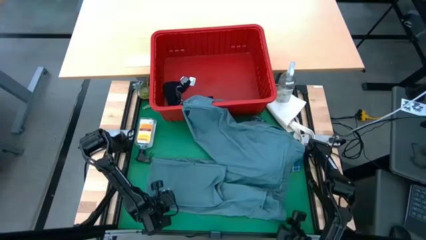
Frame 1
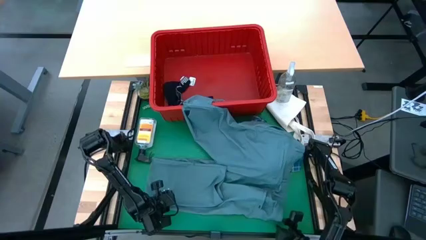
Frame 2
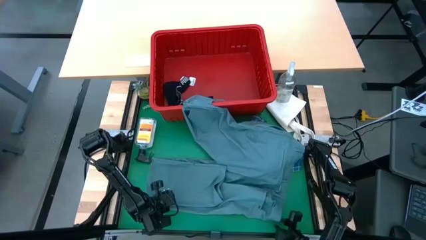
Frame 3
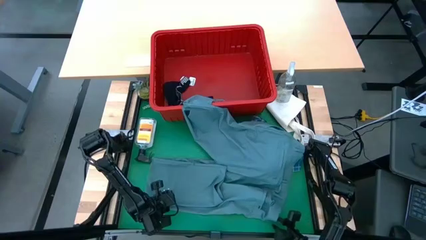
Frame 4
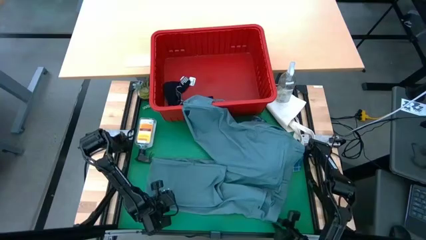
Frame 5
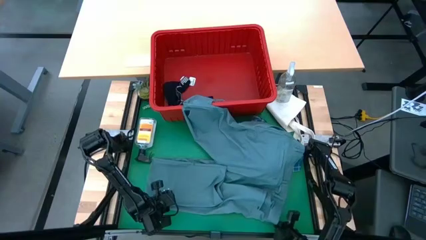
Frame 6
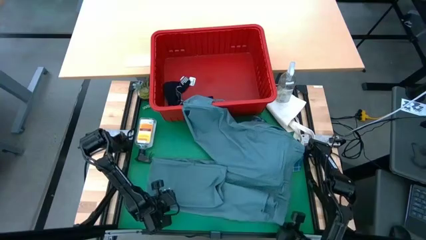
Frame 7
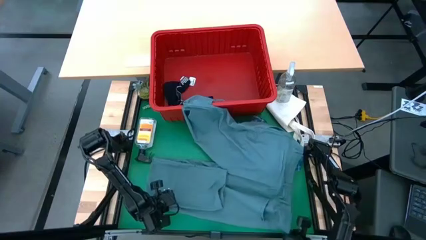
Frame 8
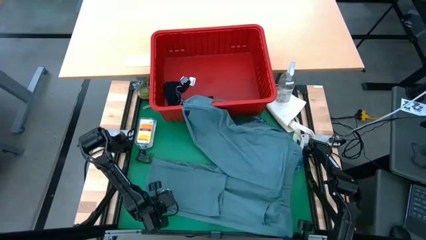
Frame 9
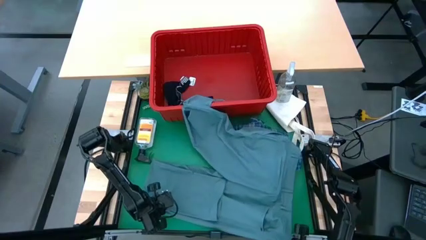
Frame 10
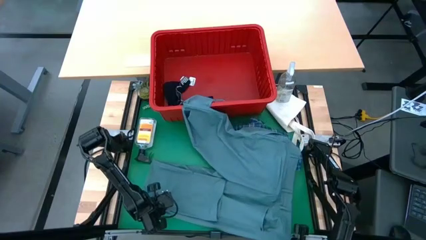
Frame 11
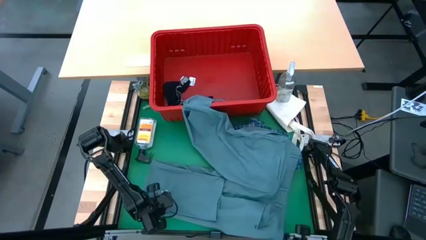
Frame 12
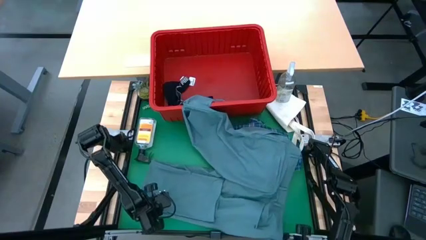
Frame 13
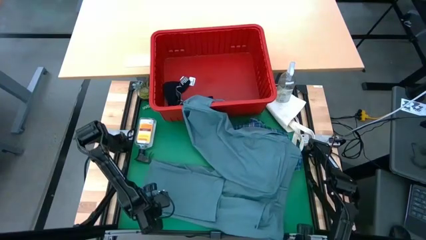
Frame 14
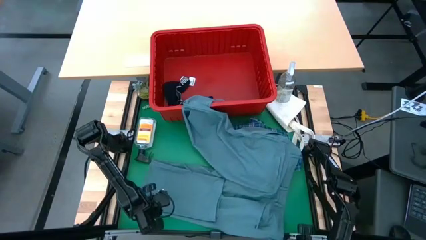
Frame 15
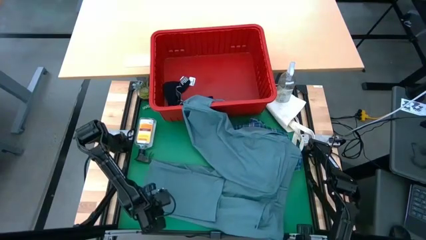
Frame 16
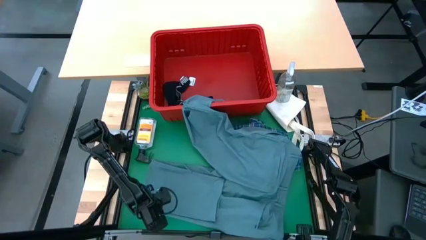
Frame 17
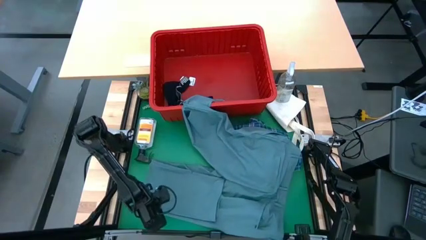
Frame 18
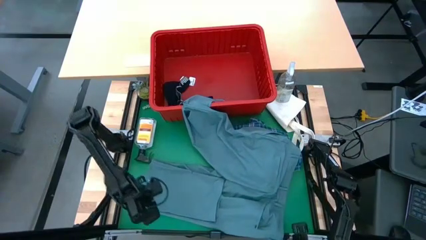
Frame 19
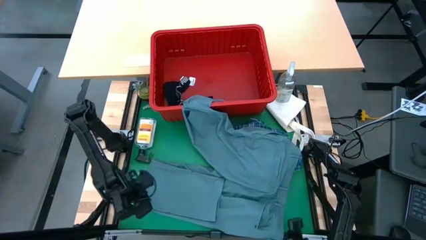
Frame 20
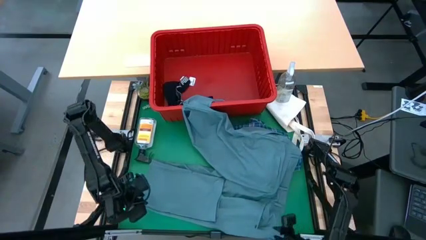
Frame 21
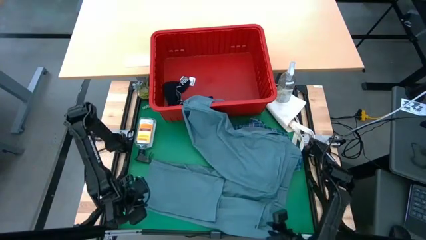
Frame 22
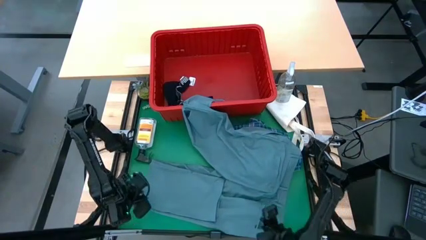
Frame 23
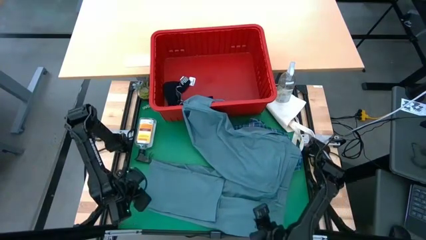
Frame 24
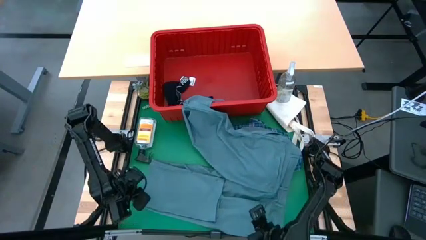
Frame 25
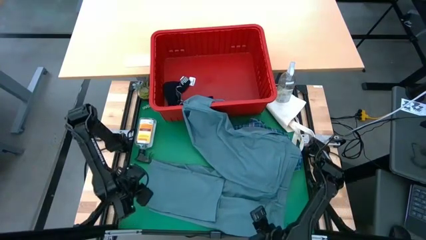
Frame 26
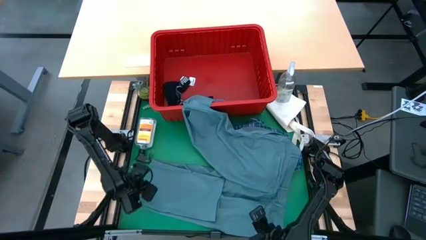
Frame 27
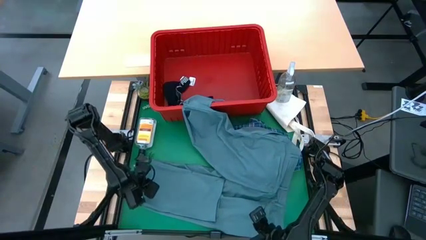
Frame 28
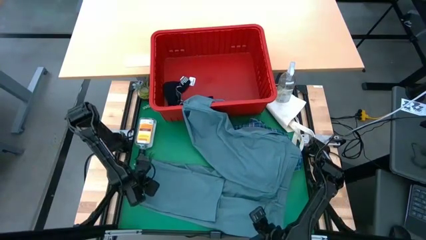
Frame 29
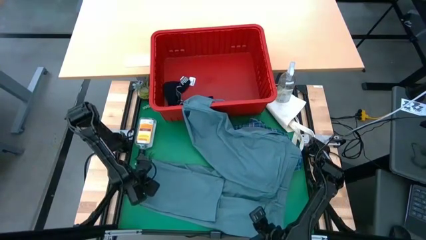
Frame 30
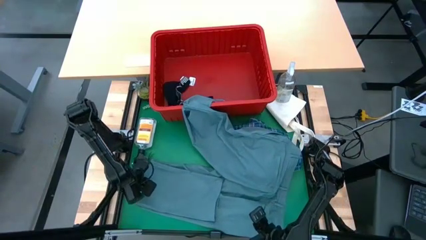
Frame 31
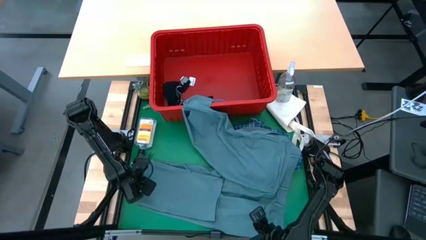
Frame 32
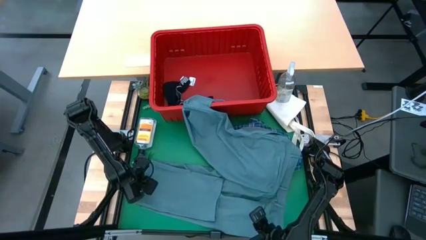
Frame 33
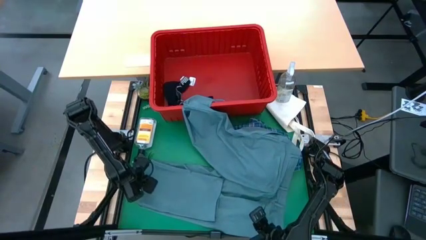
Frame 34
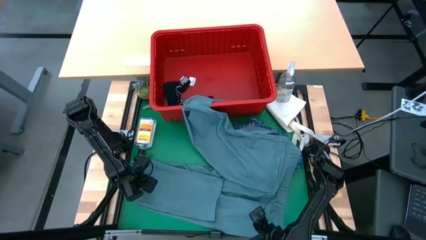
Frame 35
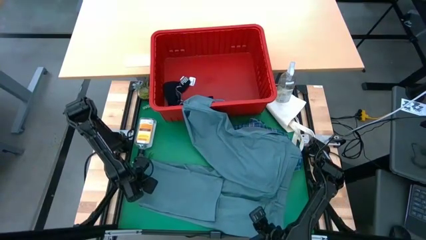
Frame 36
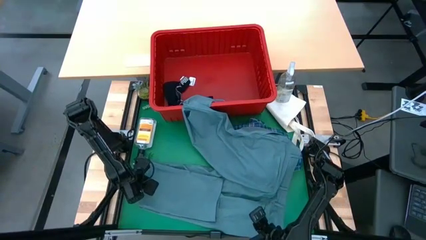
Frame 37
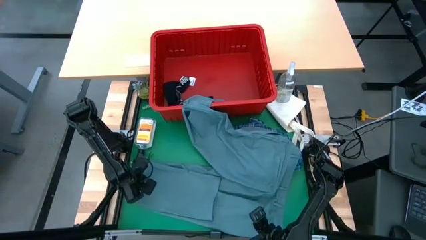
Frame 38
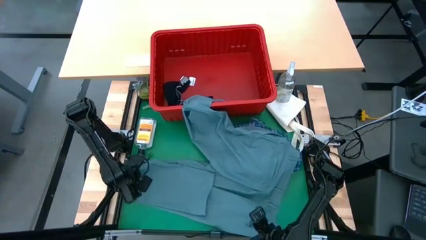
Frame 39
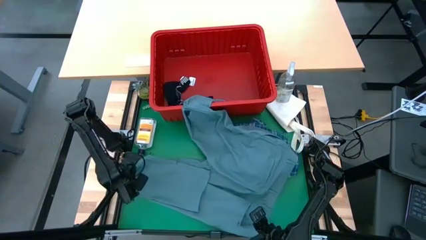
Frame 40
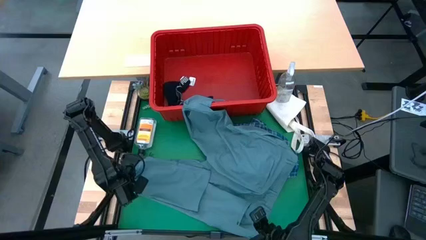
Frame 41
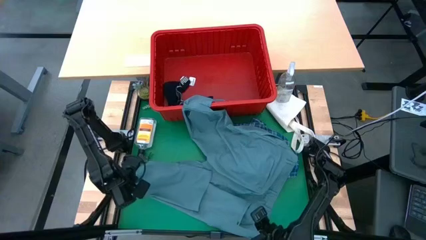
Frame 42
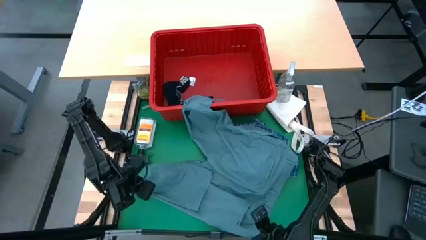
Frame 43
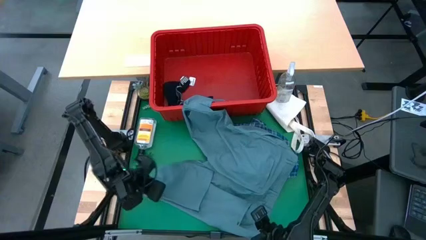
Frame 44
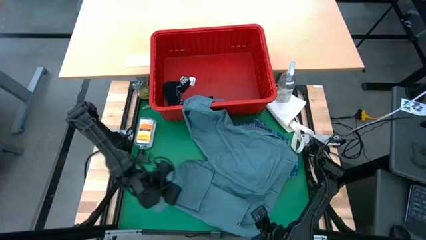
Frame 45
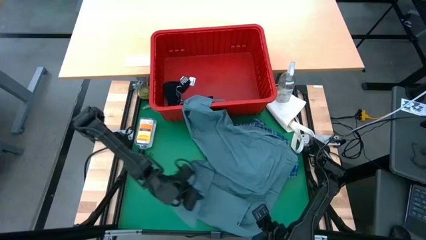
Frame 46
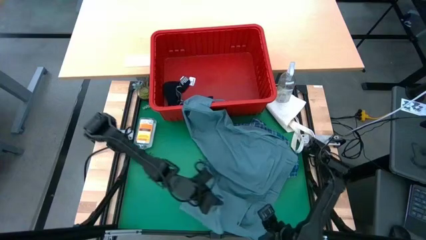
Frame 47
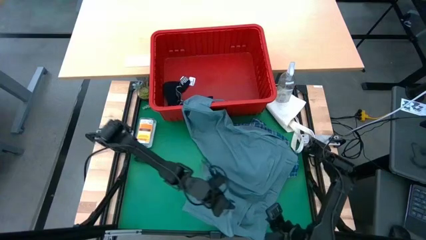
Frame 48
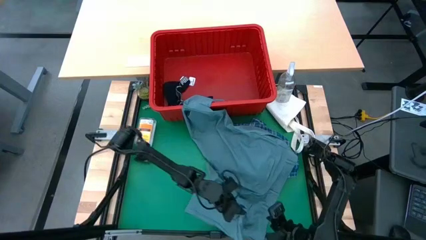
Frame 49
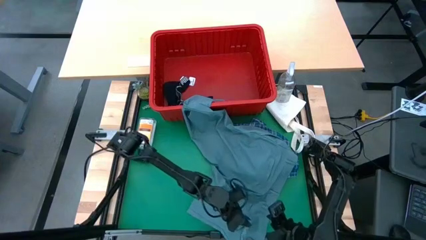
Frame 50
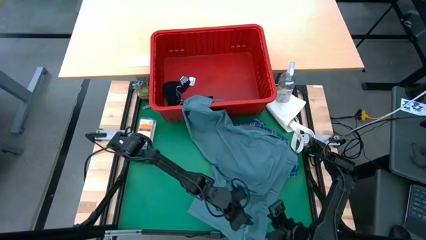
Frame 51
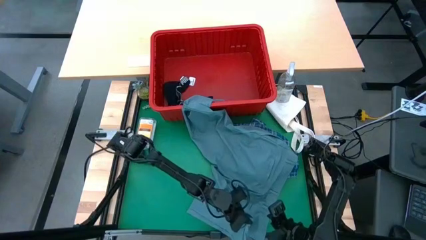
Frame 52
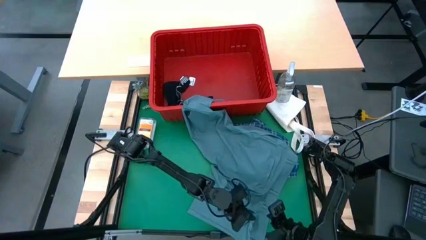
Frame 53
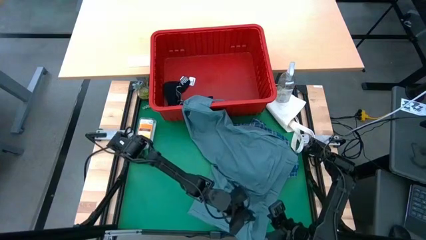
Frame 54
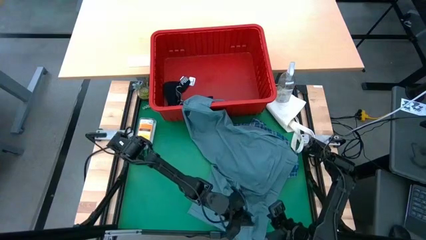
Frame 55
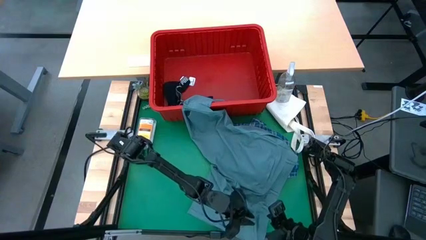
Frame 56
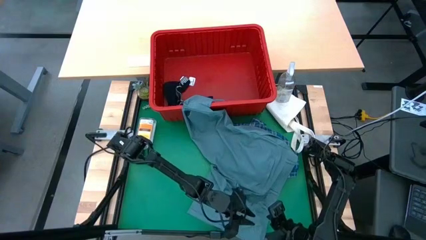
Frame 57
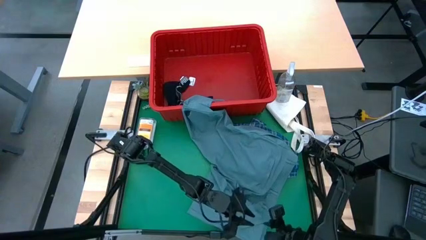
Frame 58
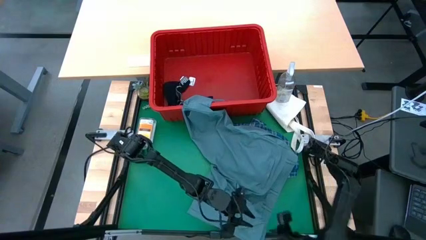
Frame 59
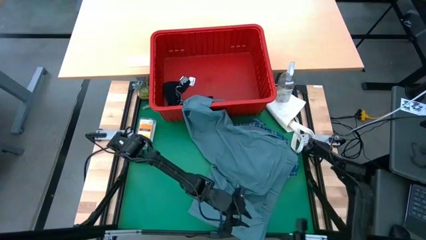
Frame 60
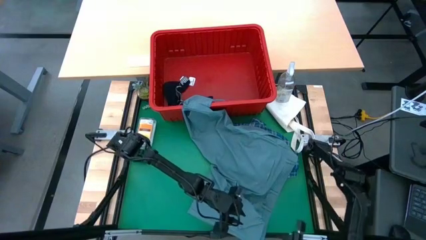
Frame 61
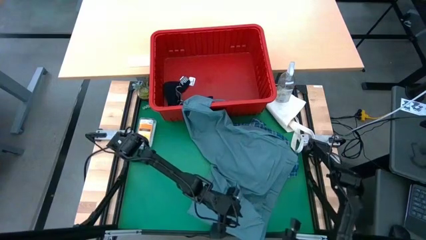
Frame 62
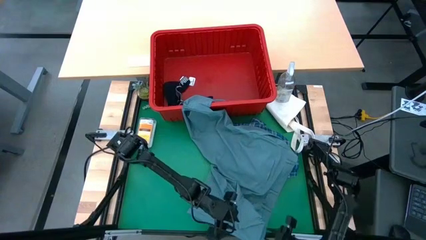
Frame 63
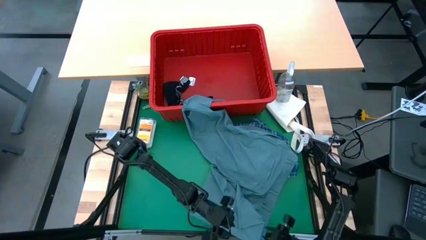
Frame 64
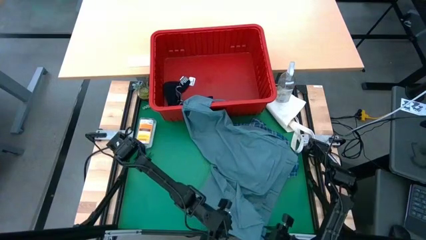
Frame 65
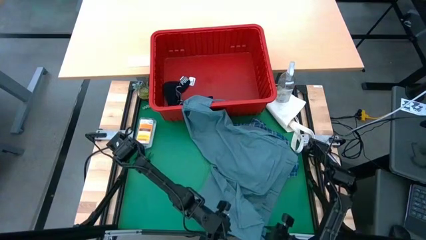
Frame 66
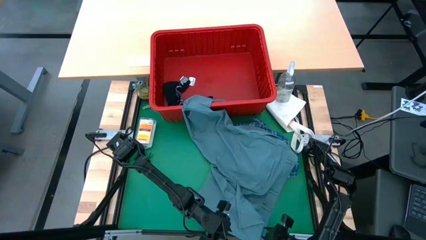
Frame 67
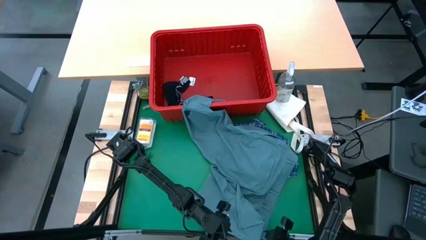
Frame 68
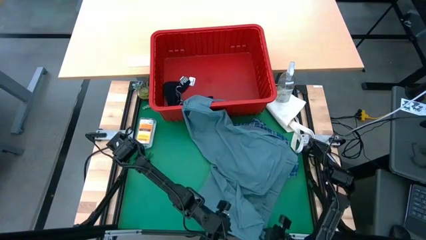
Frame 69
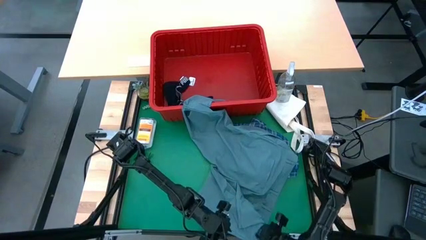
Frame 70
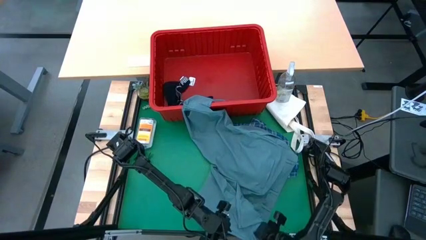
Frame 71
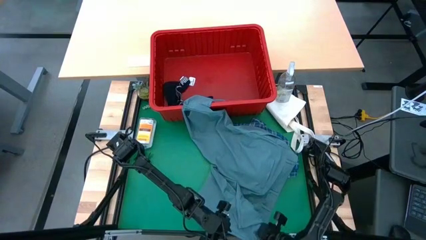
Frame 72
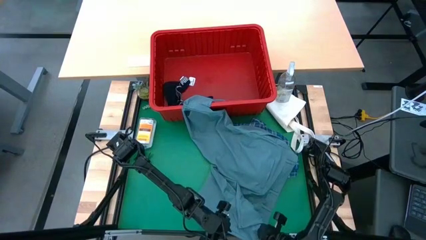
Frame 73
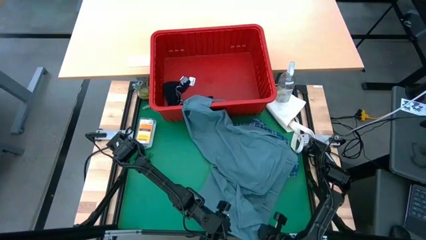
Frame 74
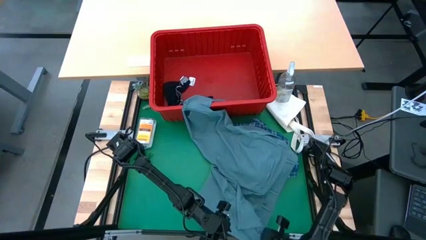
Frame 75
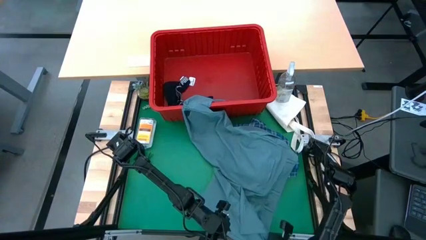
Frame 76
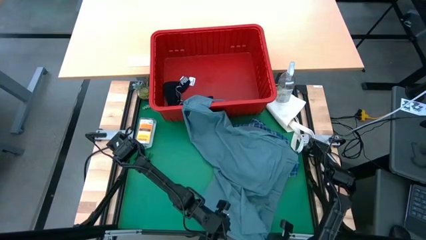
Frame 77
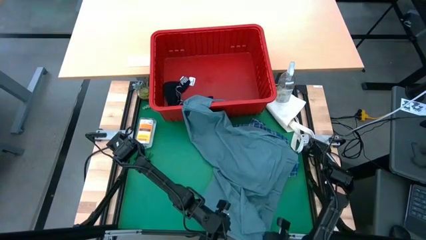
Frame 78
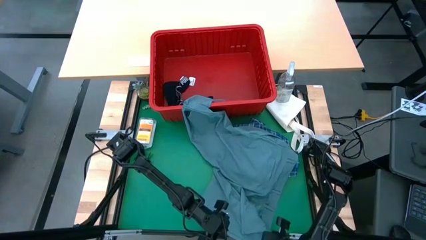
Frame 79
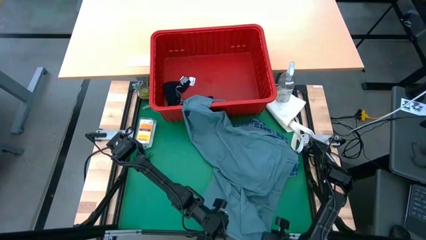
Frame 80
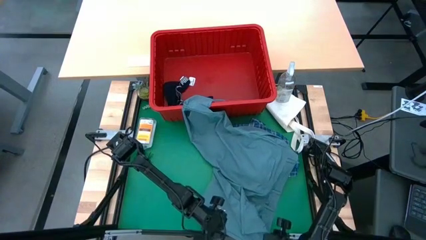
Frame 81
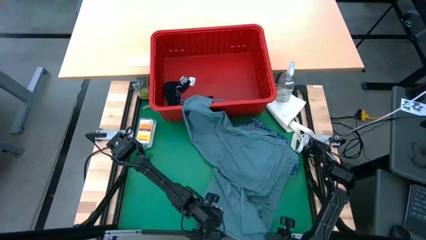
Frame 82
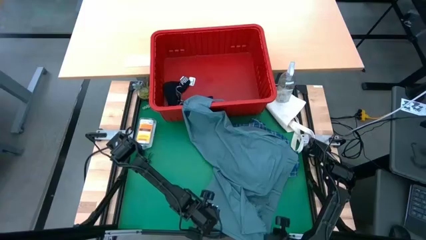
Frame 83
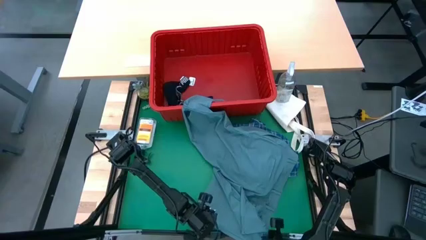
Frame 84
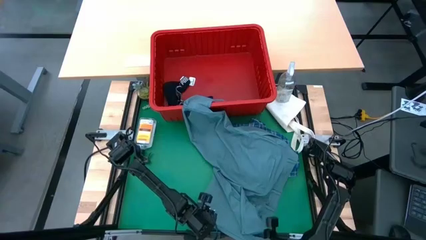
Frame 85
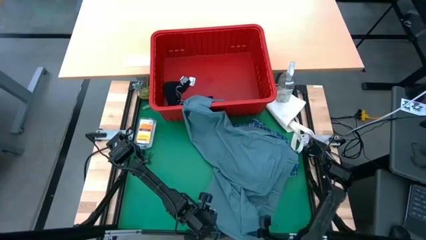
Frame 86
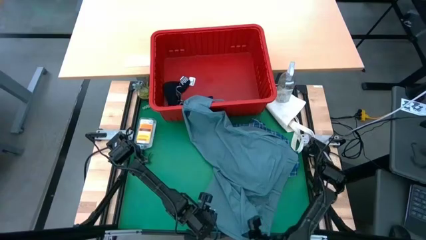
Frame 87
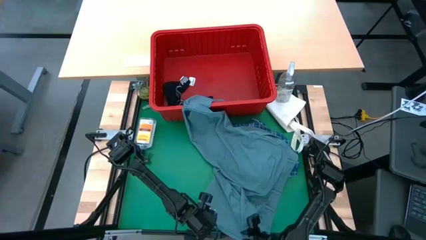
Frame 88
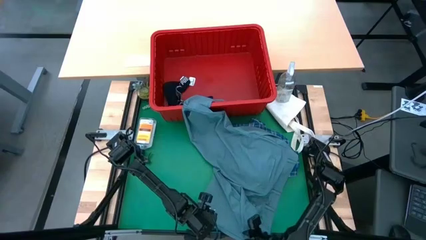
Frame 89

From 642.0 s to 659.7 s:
Task: Fold Laundry from Bin
Fold the blue pants on top of the blue shirt
